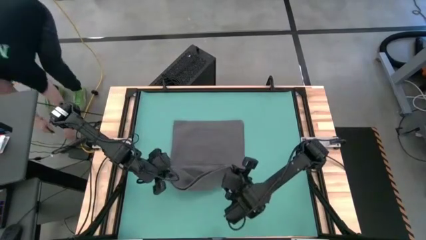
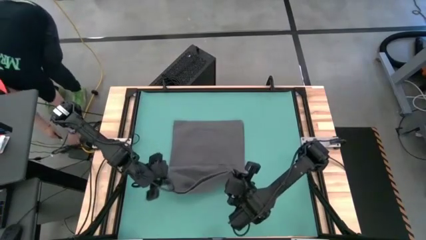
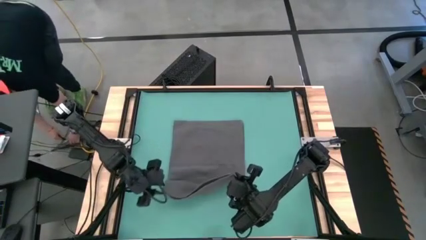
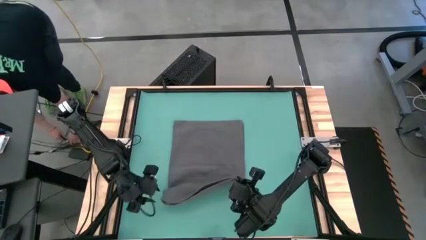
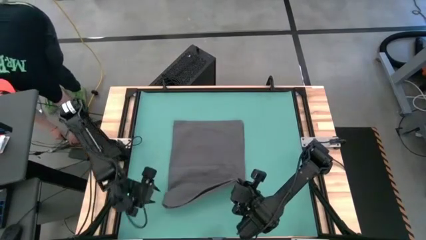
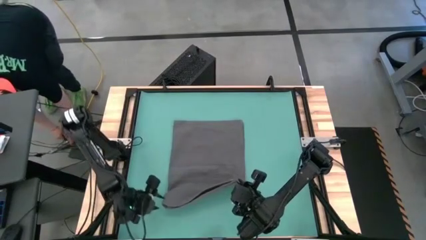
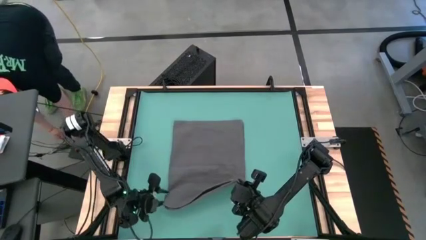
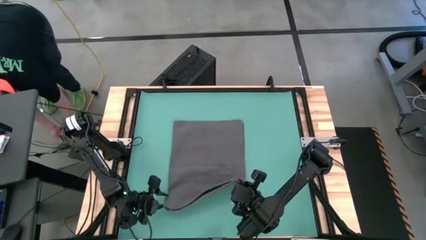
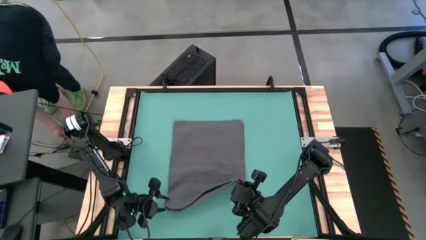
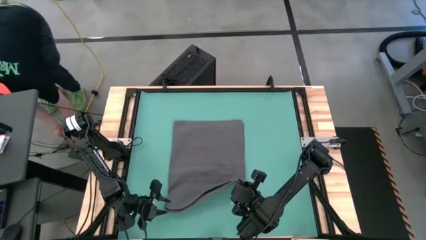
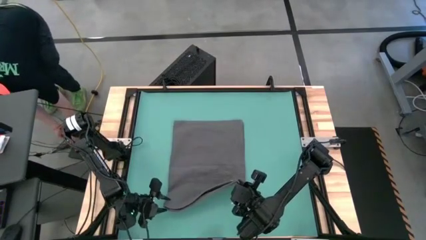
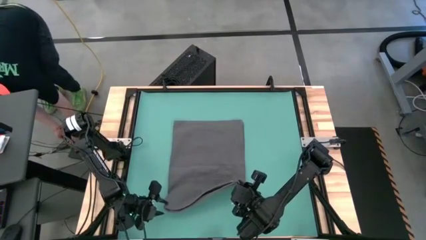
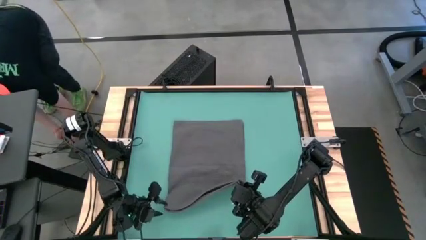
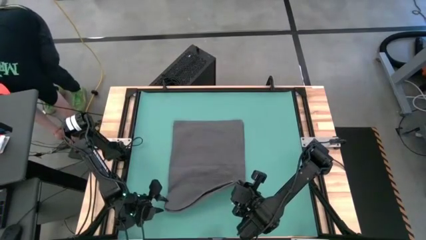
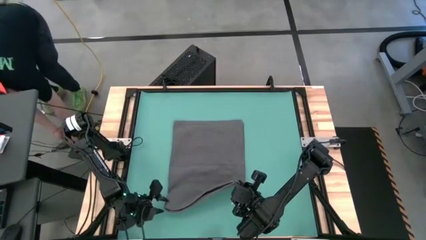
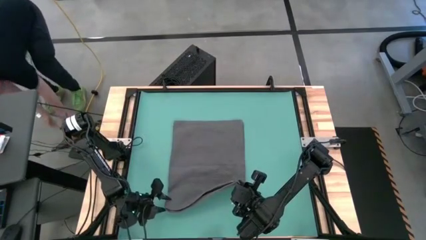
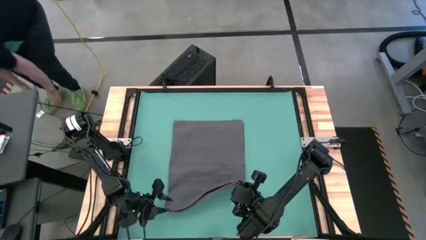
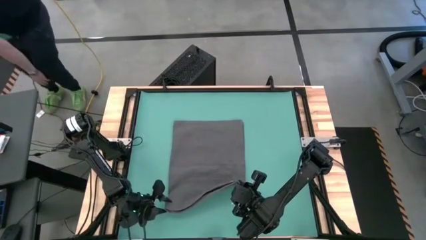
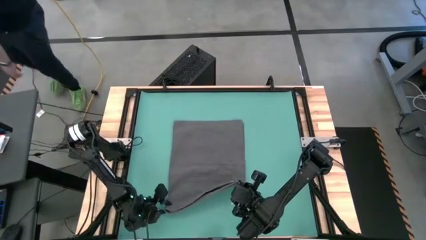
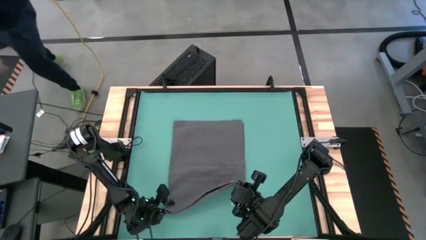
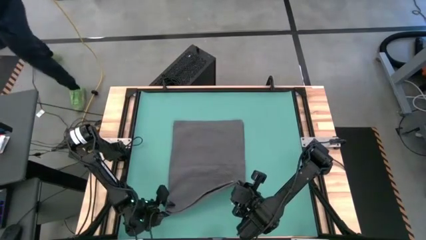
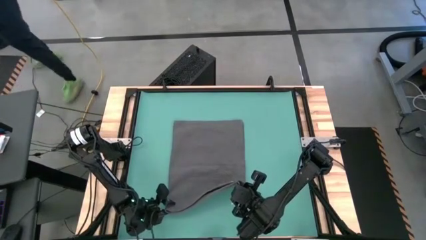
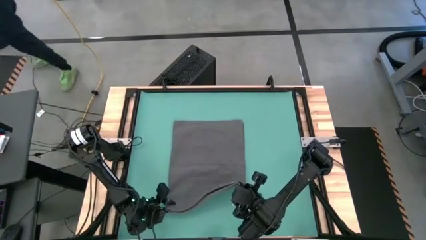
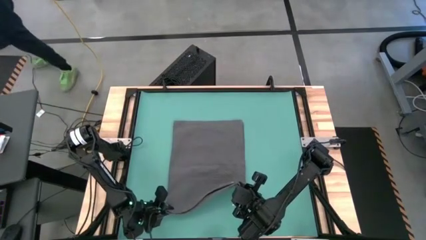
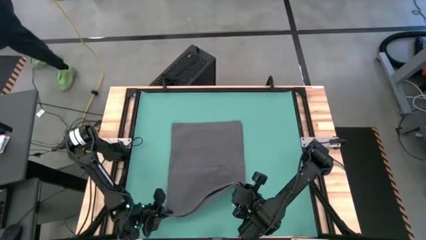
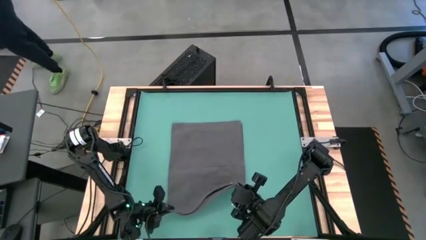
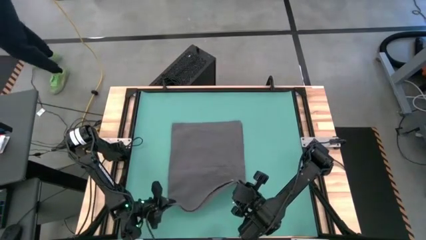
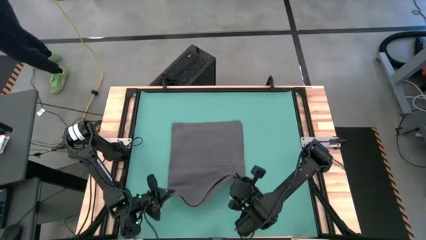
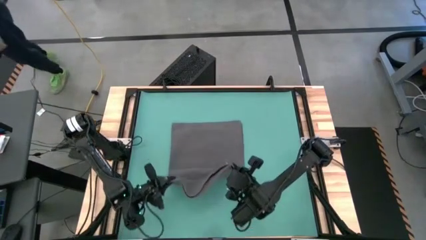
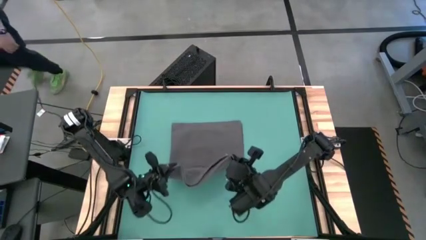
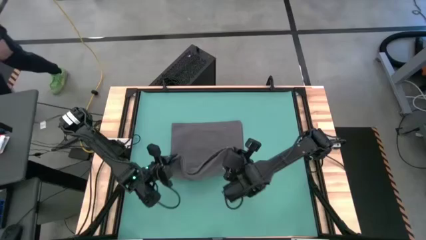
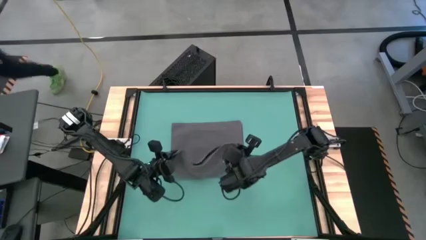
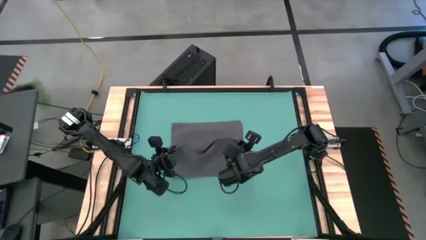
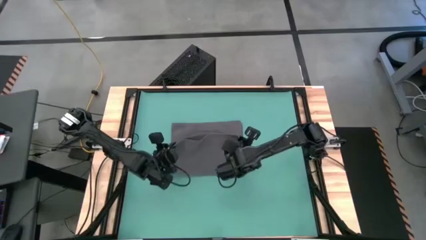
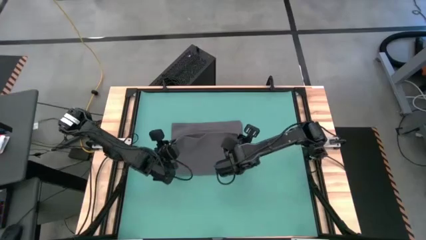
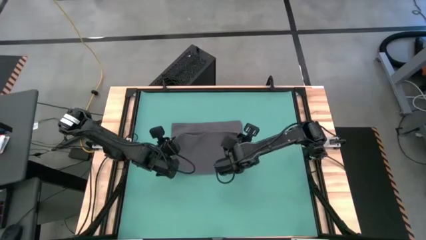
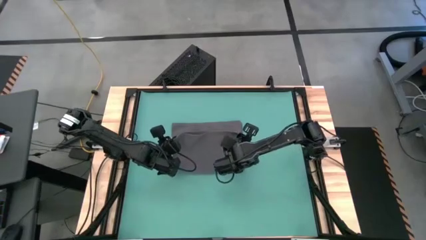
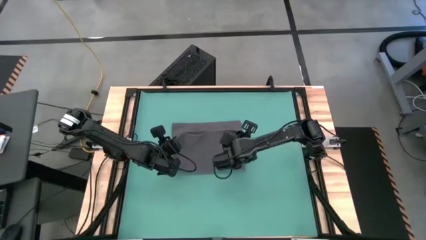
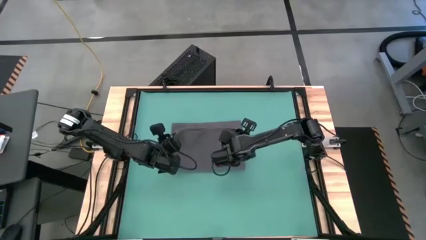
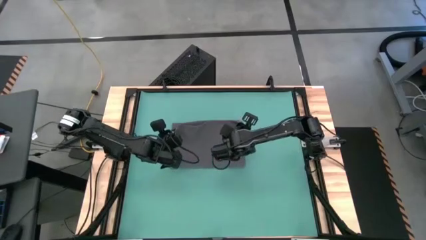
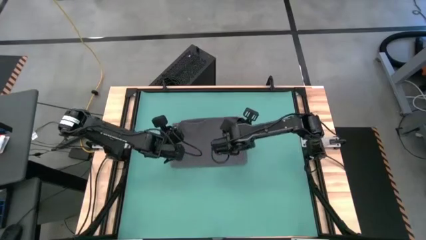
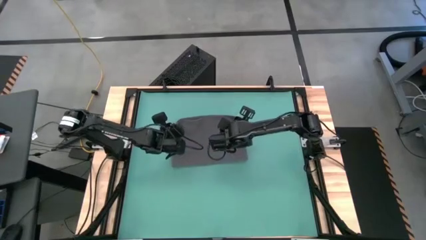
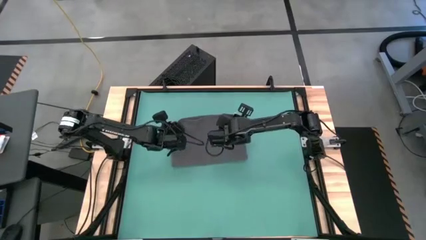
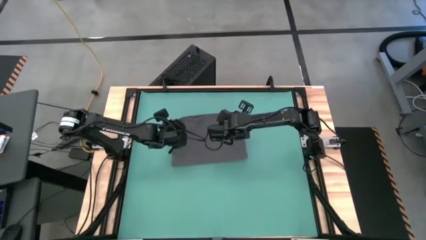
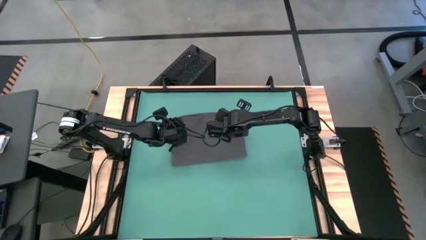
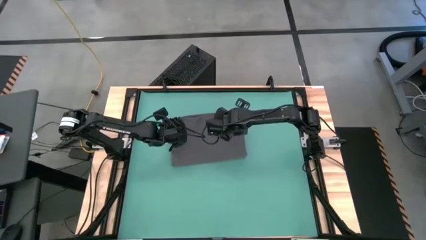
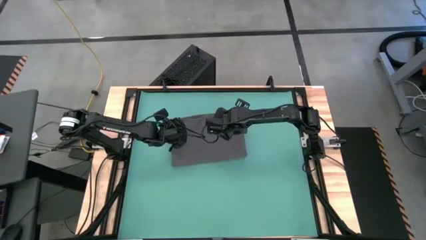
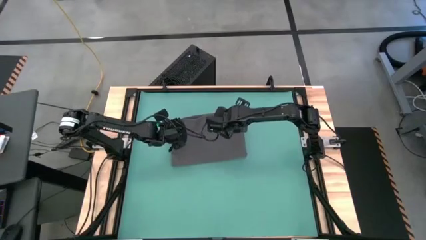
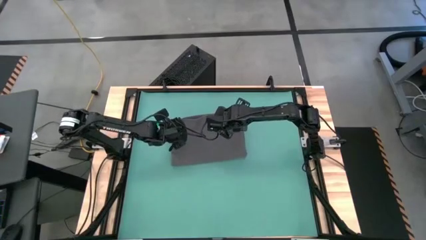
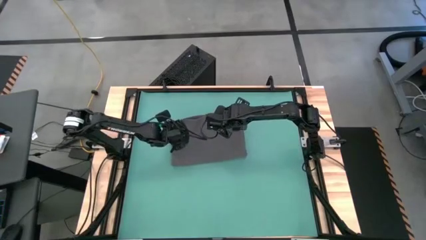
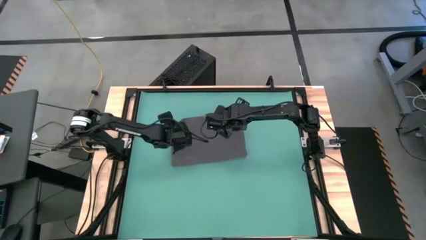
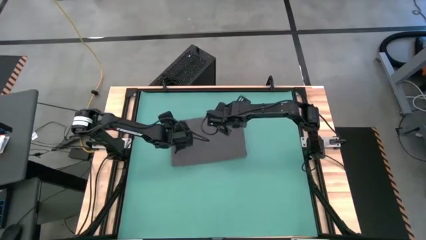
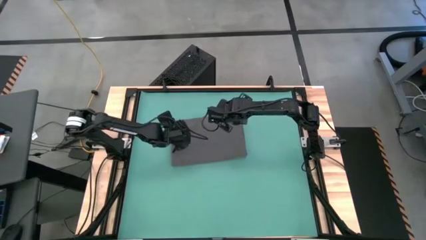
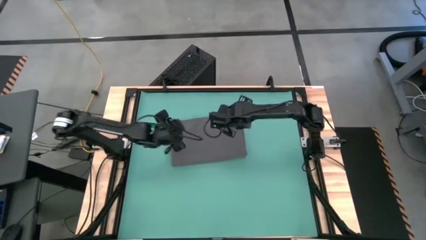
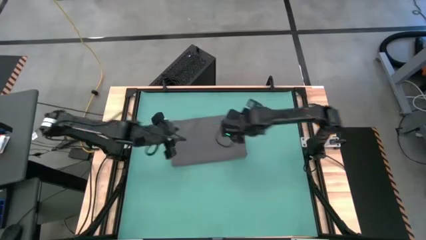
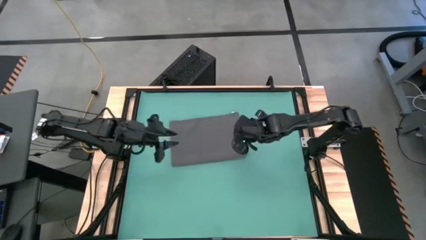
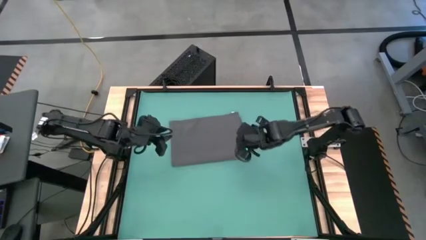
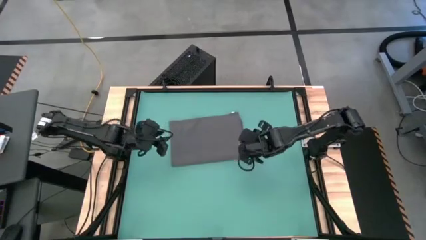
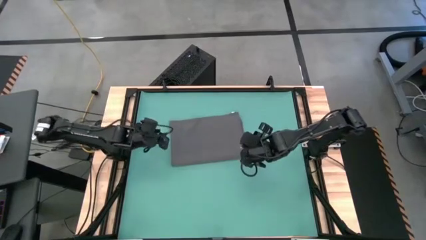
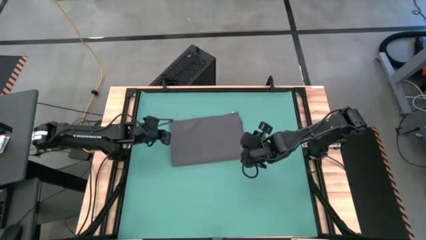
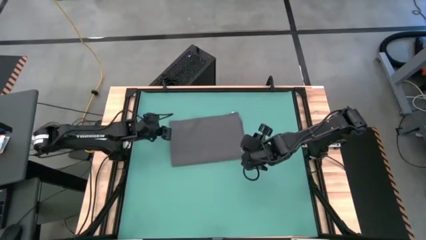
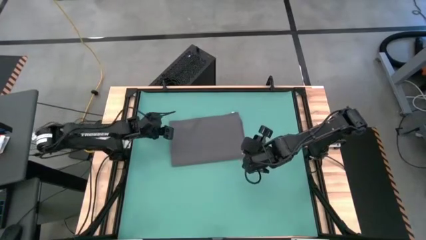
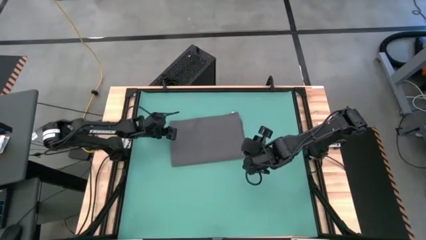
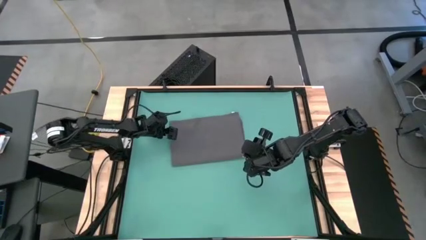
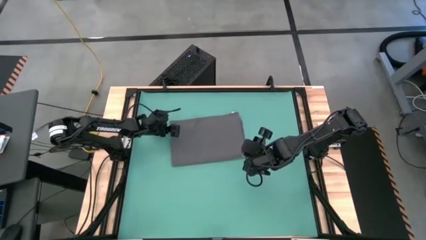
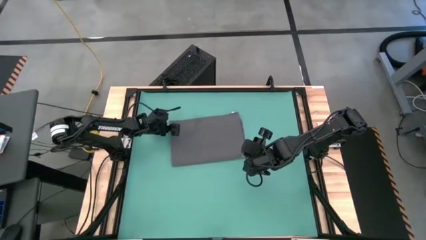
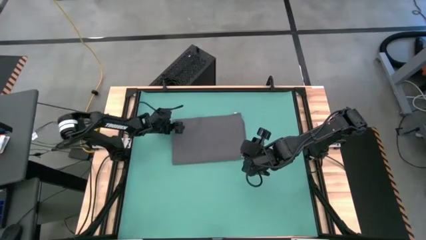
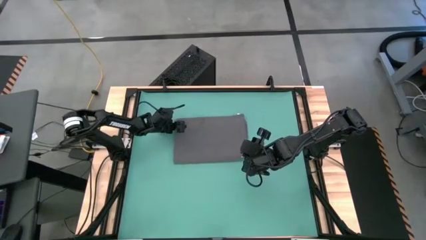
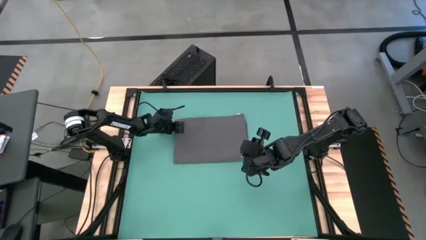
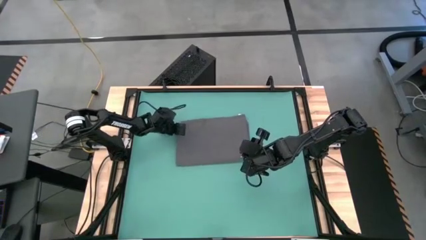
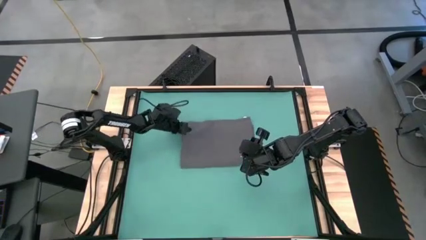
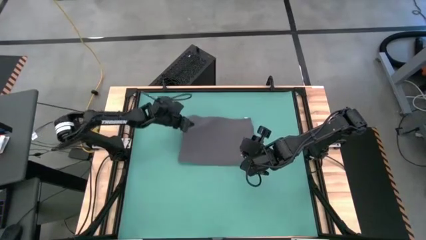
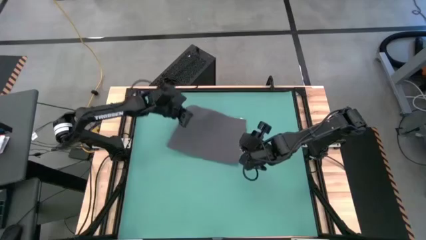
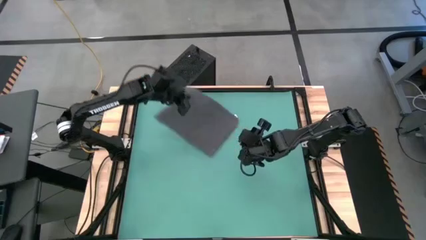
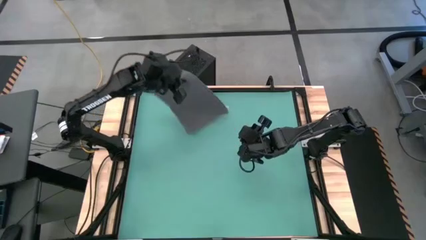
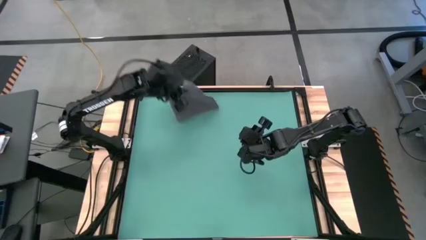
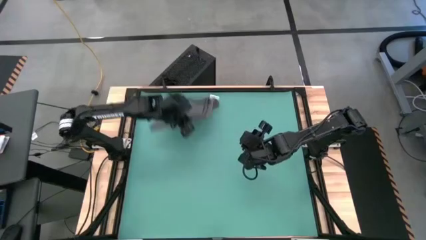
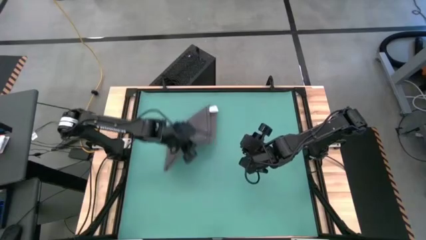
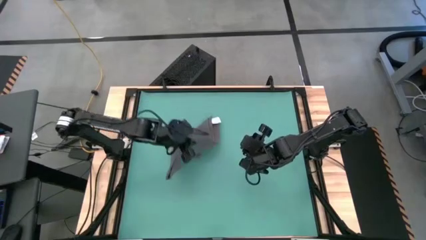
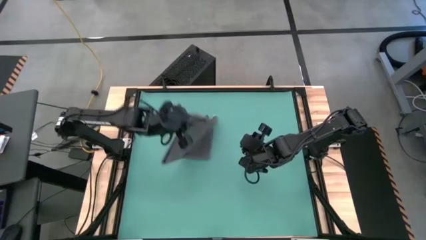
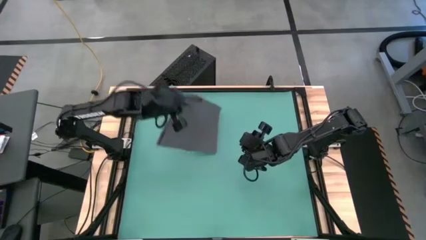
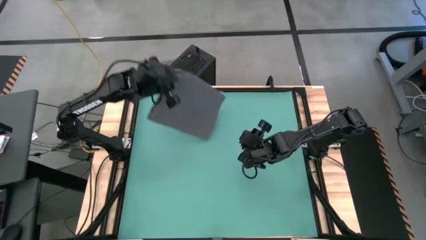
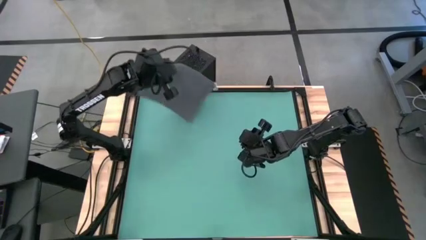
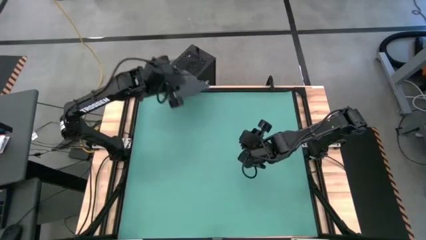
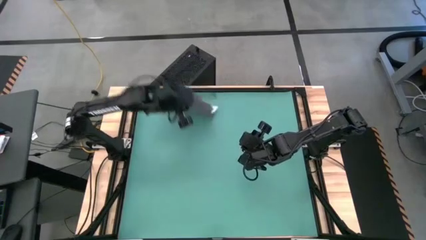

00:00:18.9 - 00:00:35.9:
Task: Roll towel into tight, uniform cylinder
Roll the gray towel
